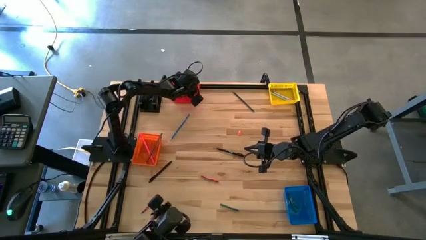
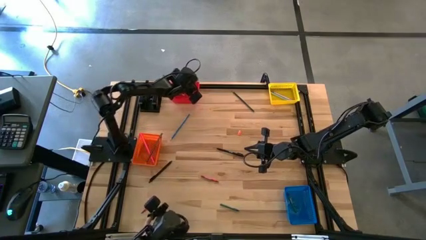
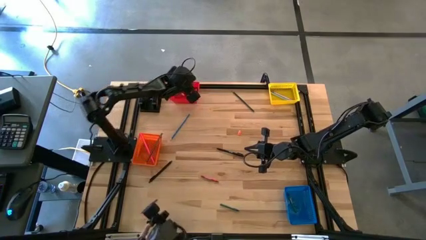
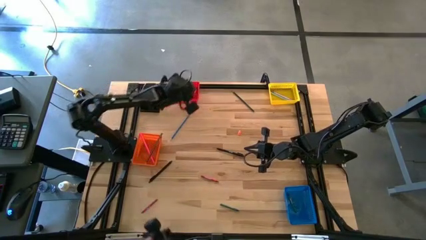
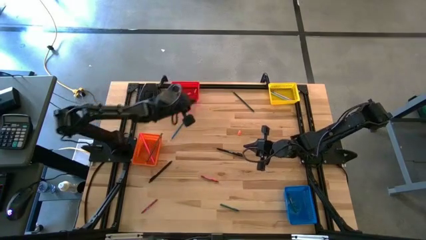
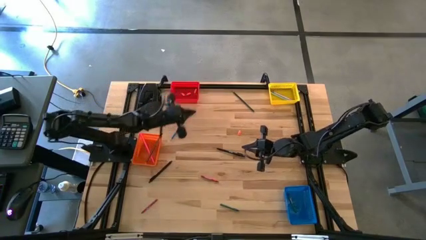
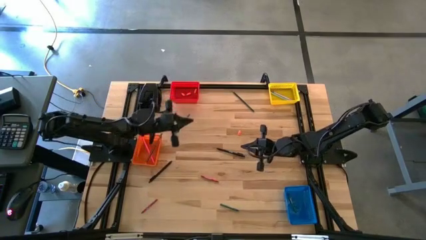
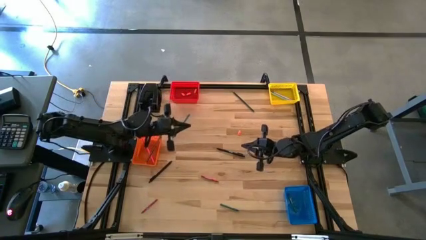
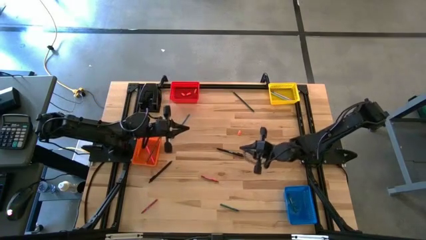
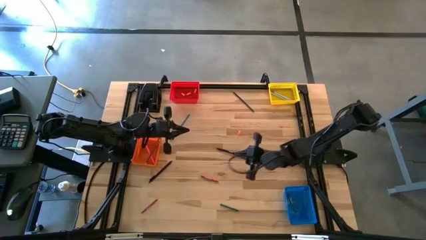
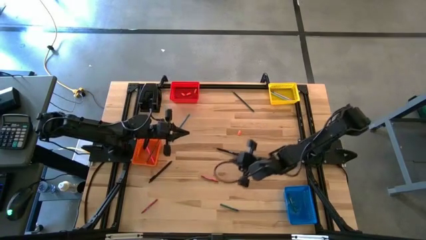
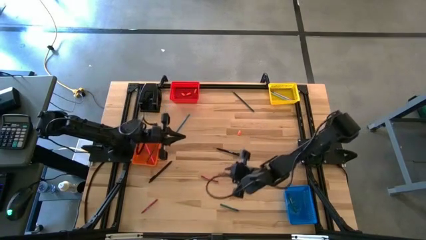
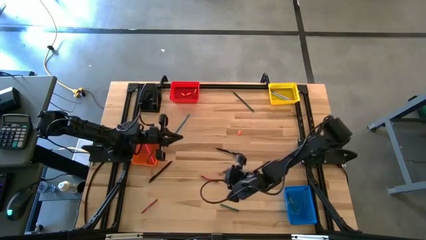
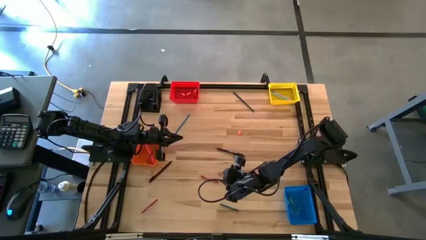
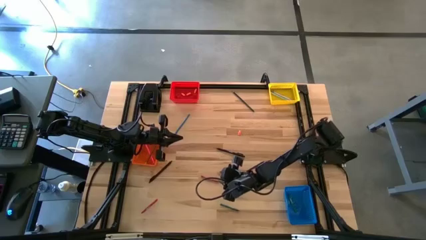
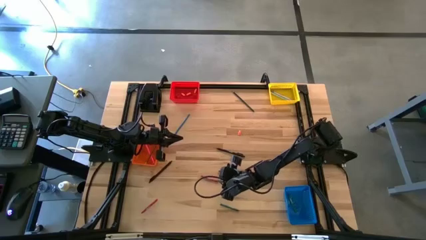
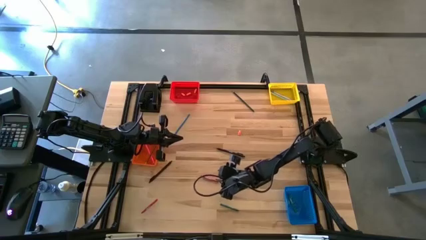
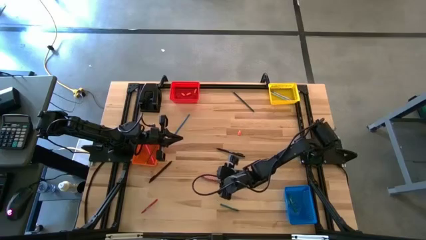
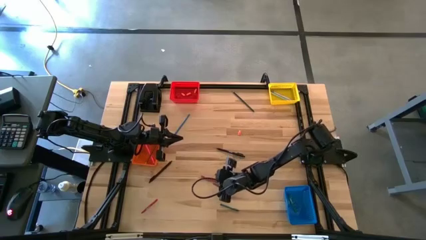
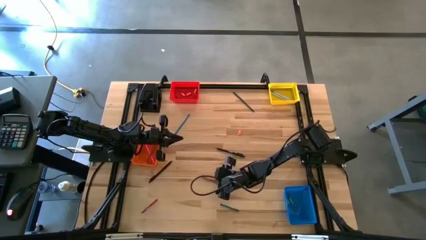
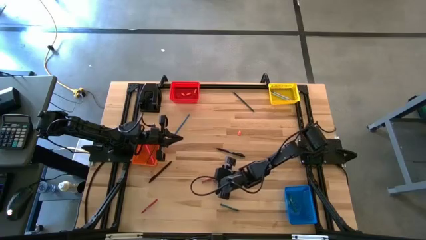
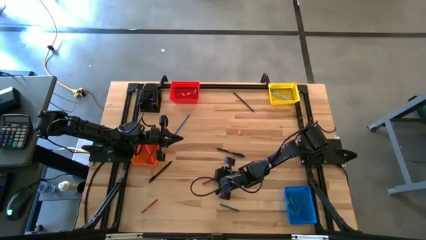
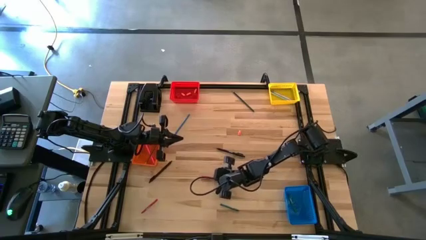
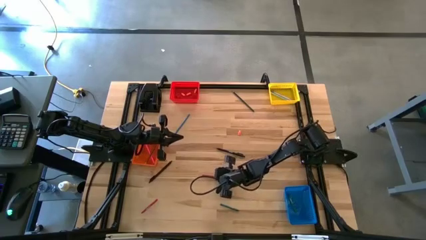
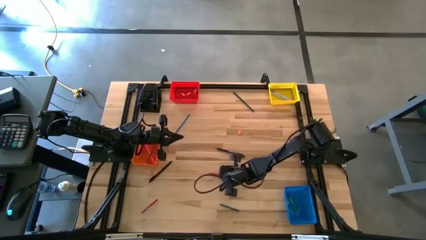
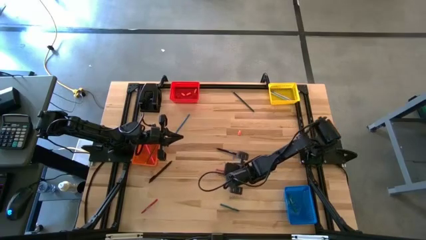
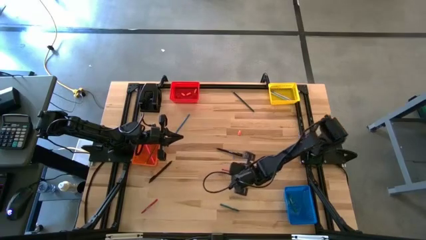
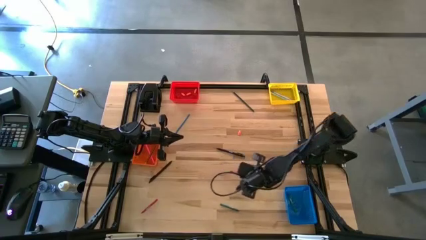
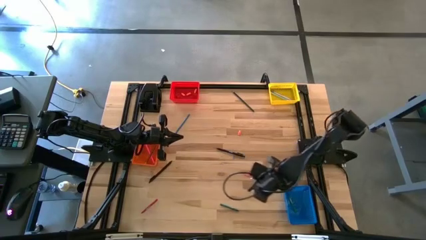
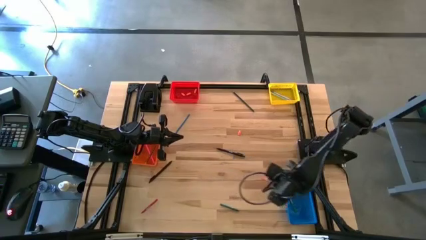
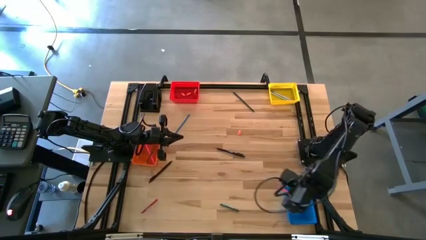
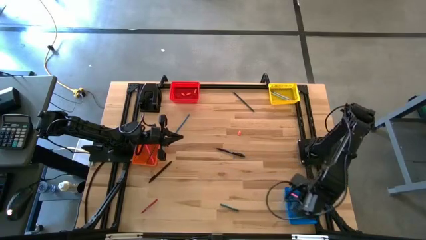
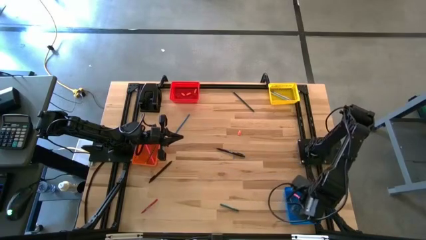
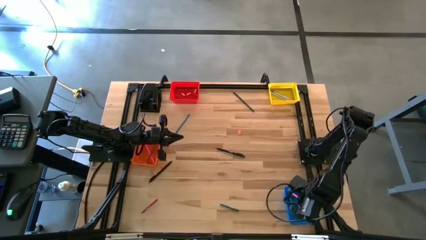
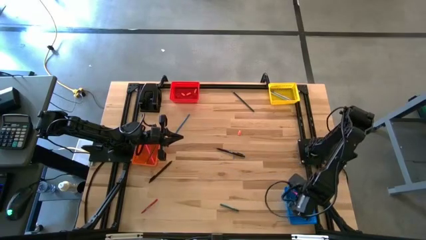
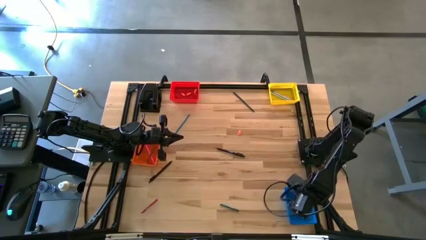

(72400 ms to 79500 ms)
Task: Sort crayons/erasers/pens/pencils in bins
Put the red crayon into the blue basket

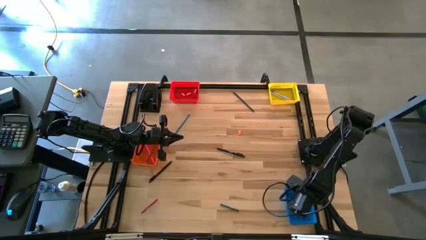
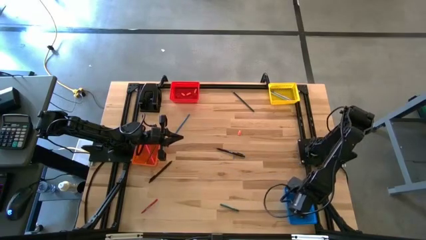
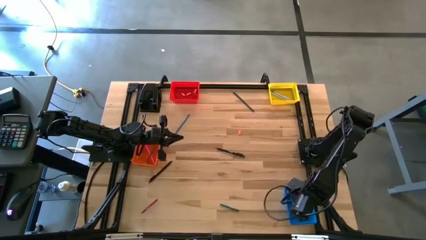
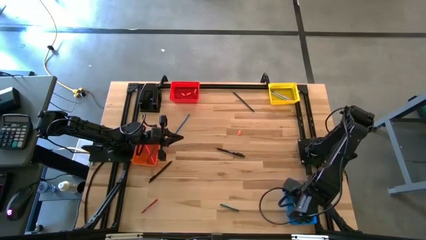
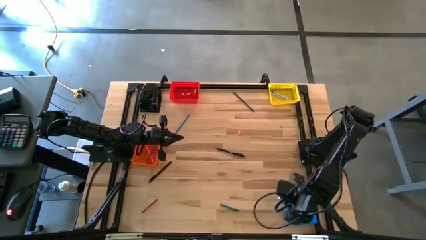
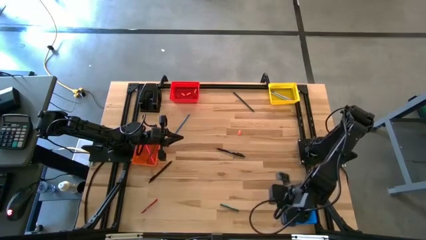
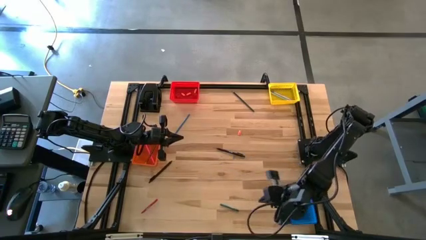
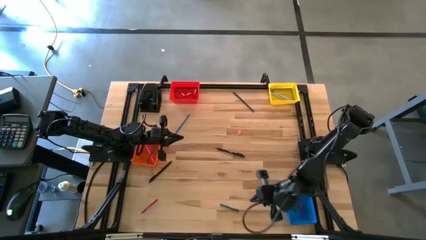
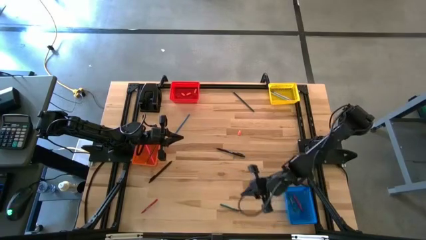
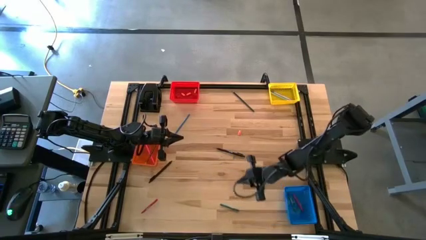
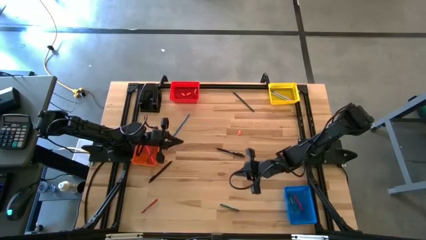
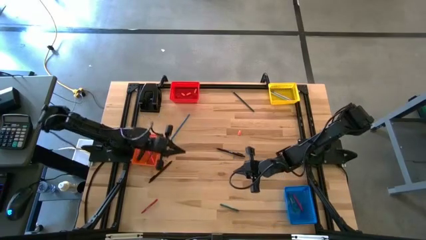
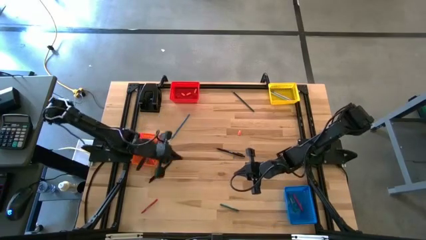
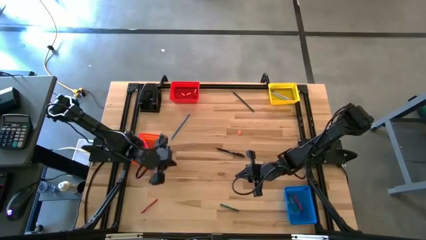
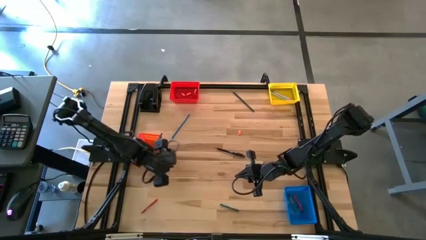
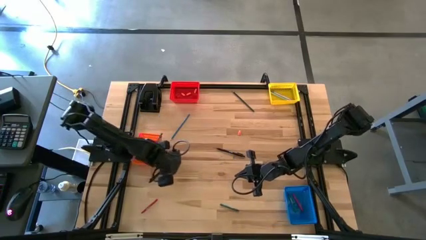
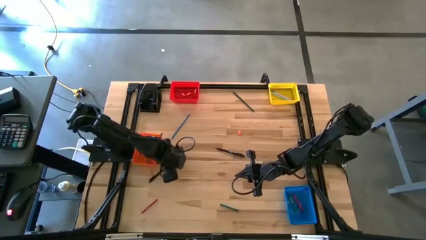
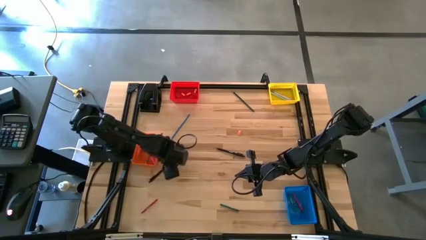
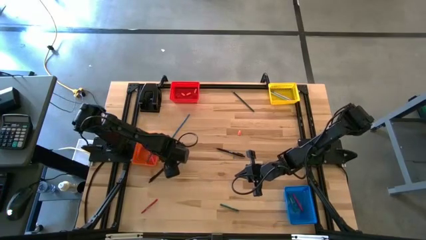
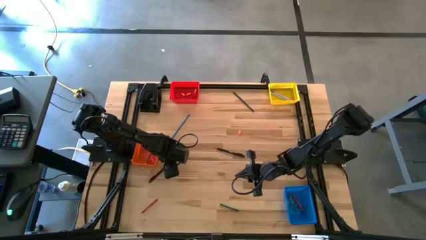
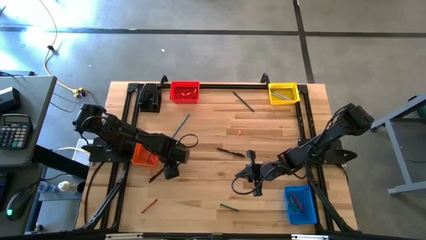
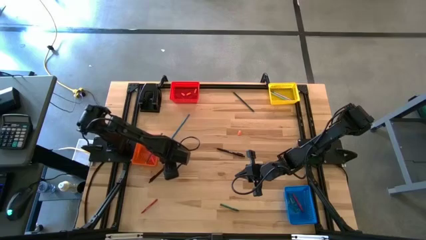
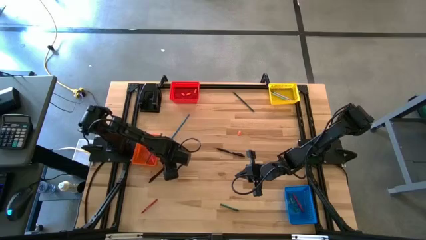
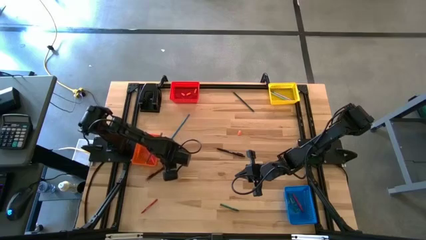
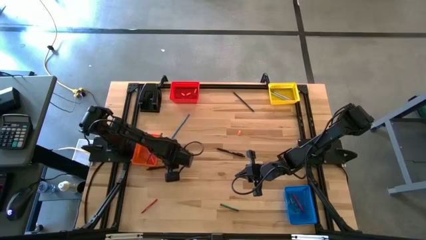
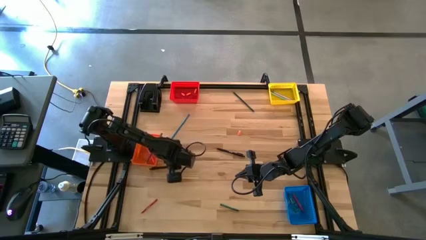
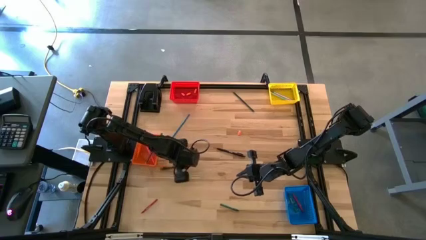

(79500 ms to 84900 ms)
Put the black pen into the yellow basket
